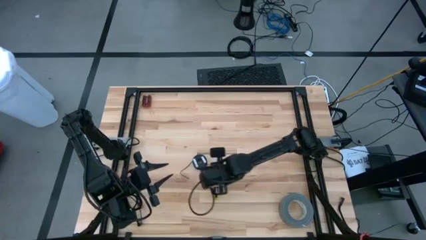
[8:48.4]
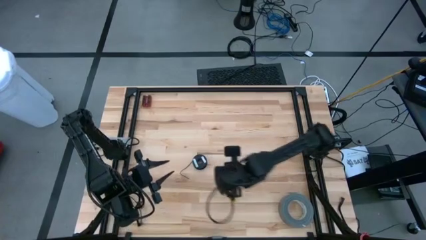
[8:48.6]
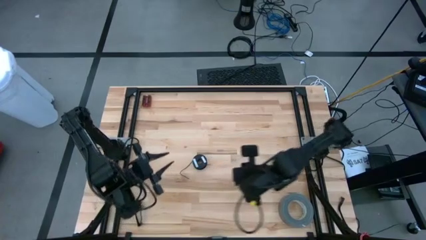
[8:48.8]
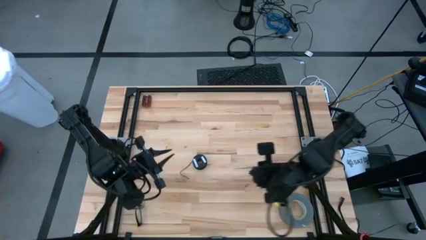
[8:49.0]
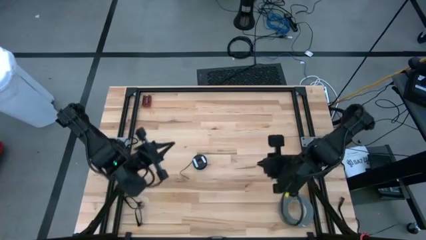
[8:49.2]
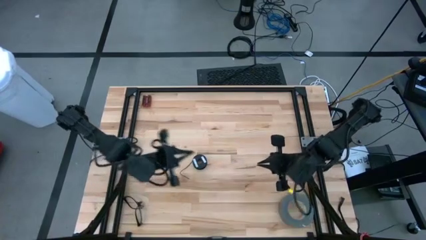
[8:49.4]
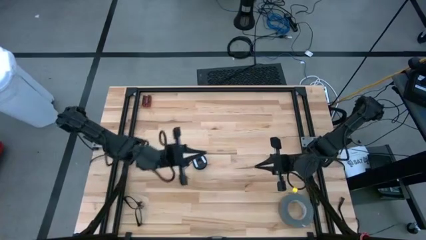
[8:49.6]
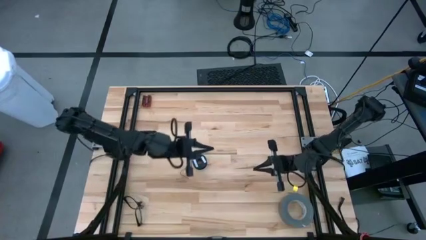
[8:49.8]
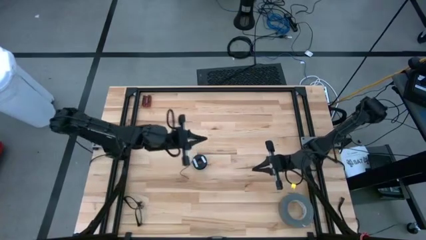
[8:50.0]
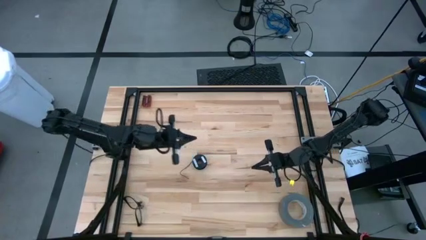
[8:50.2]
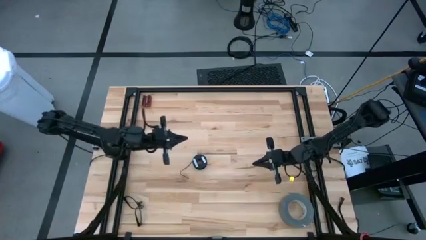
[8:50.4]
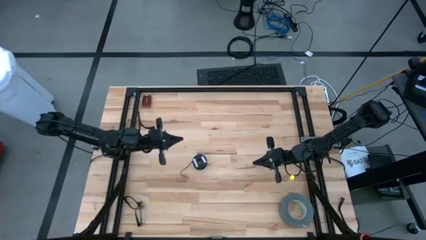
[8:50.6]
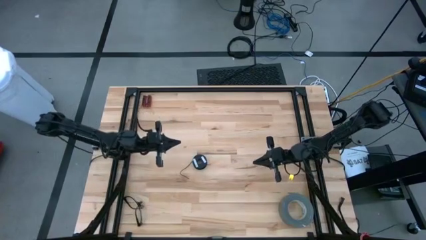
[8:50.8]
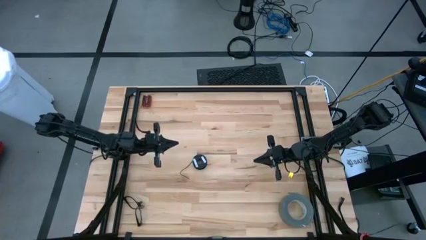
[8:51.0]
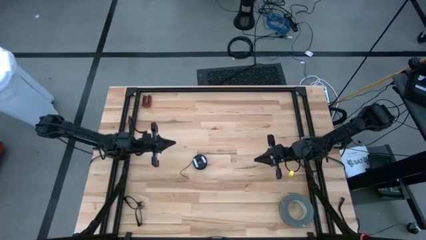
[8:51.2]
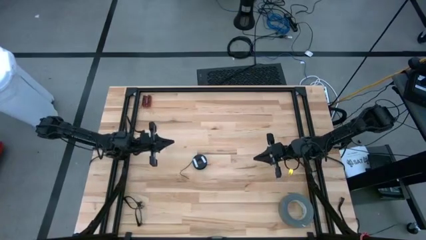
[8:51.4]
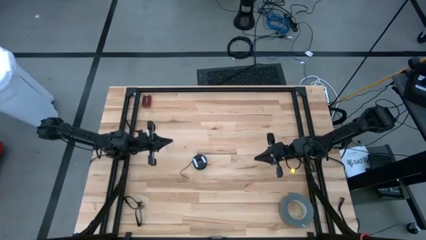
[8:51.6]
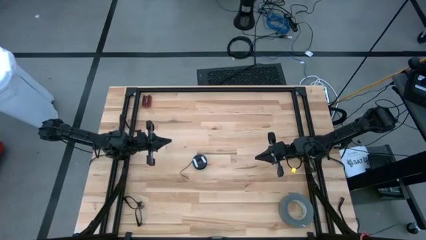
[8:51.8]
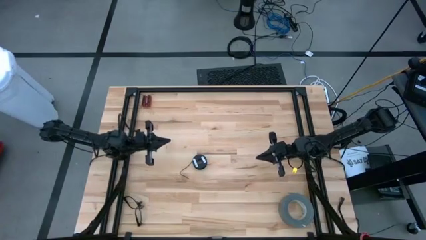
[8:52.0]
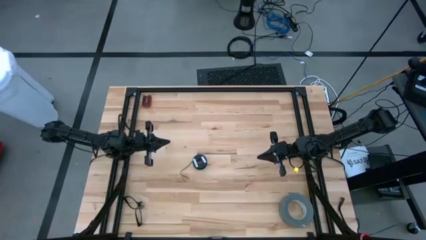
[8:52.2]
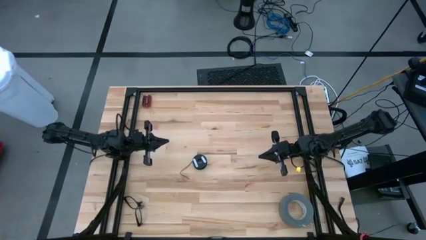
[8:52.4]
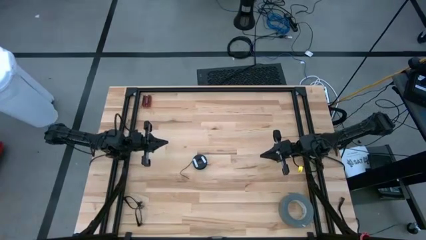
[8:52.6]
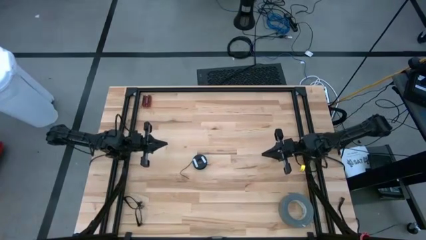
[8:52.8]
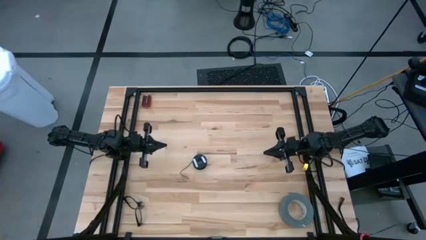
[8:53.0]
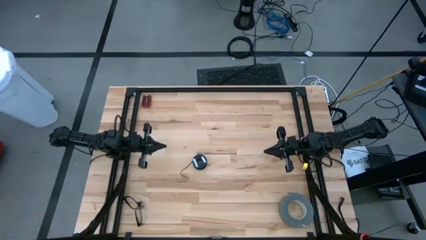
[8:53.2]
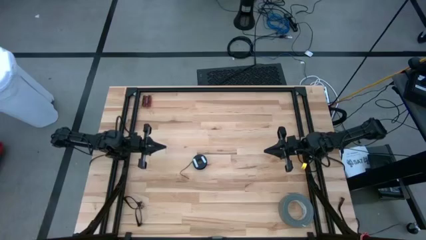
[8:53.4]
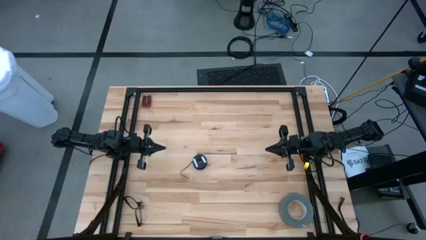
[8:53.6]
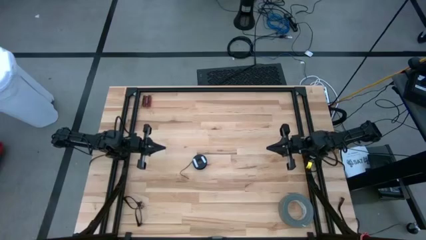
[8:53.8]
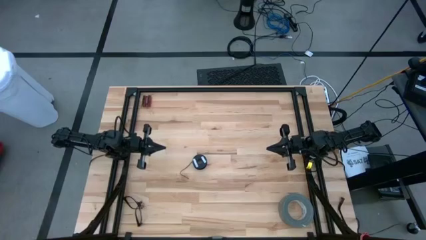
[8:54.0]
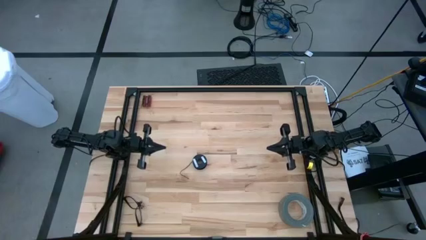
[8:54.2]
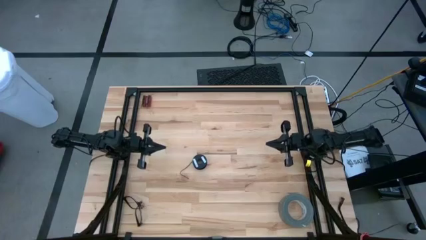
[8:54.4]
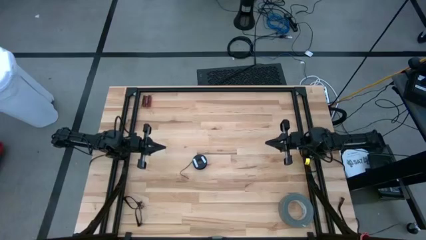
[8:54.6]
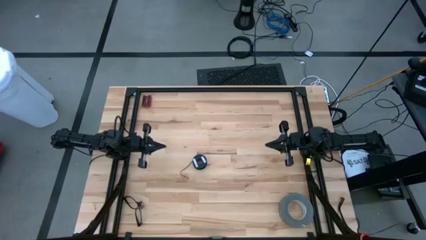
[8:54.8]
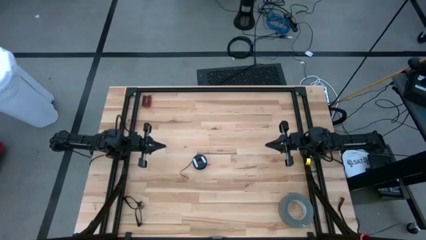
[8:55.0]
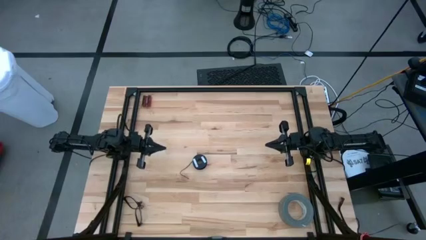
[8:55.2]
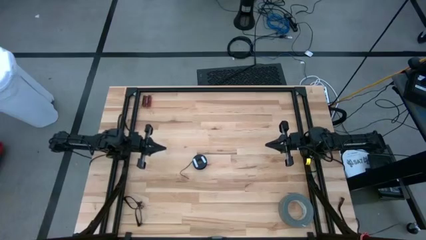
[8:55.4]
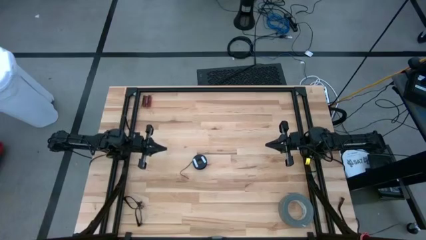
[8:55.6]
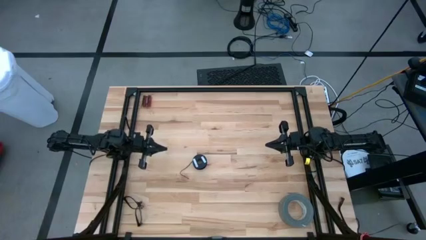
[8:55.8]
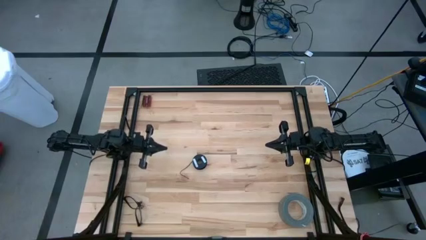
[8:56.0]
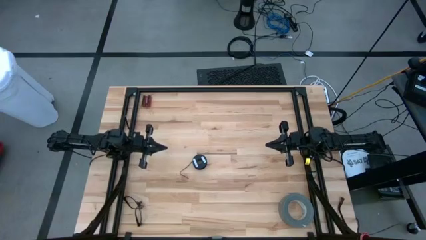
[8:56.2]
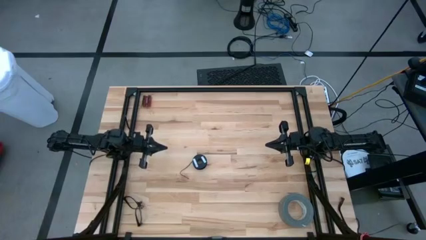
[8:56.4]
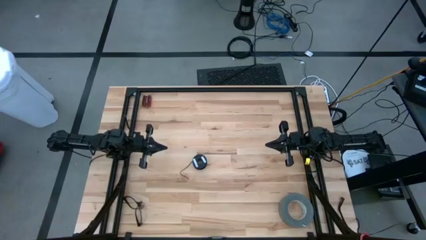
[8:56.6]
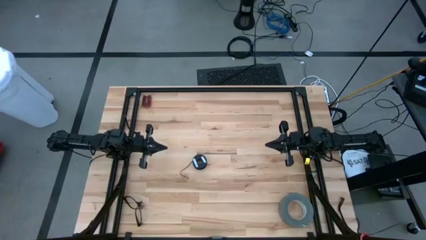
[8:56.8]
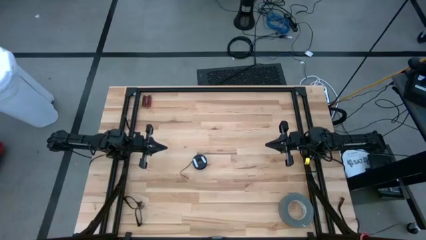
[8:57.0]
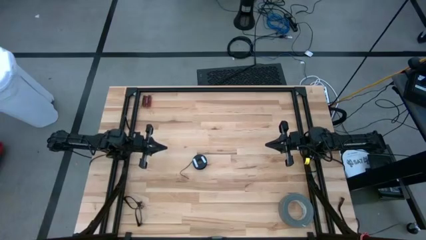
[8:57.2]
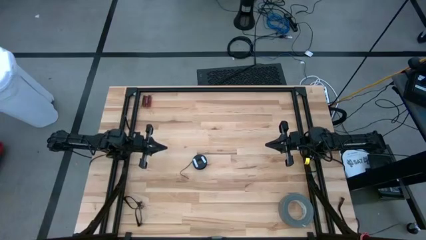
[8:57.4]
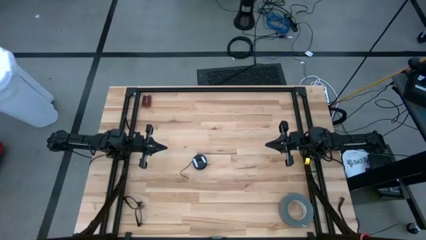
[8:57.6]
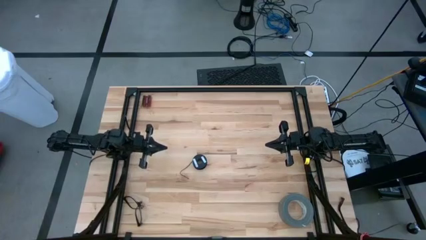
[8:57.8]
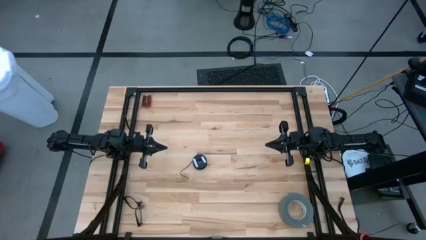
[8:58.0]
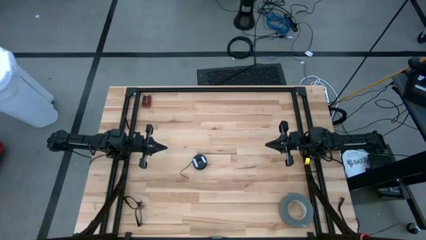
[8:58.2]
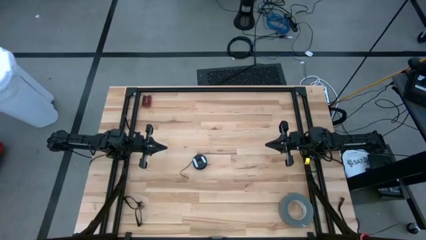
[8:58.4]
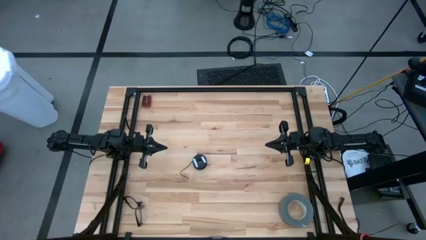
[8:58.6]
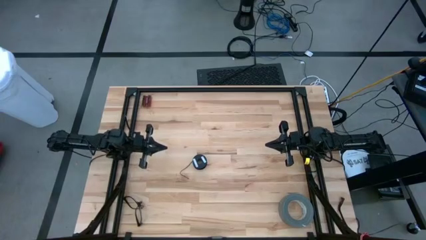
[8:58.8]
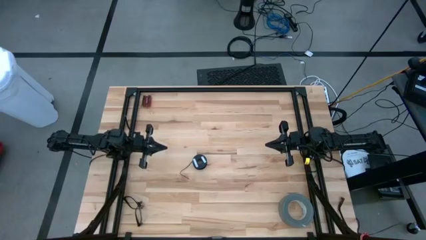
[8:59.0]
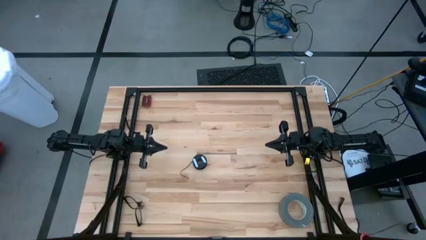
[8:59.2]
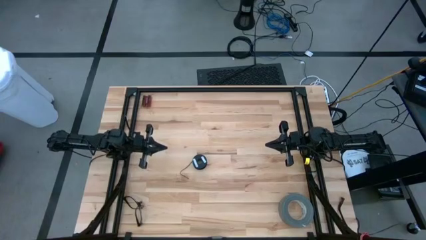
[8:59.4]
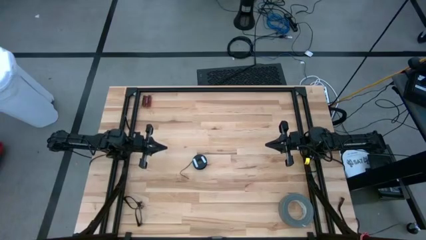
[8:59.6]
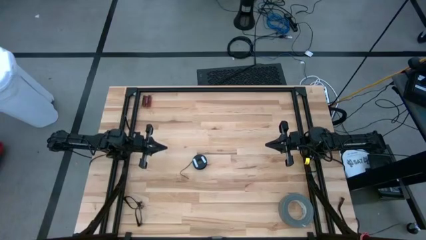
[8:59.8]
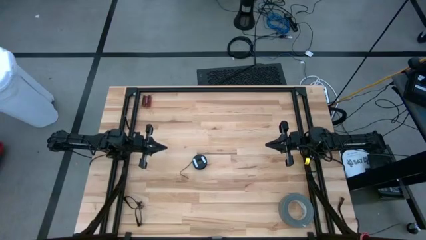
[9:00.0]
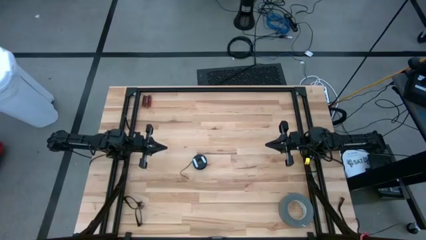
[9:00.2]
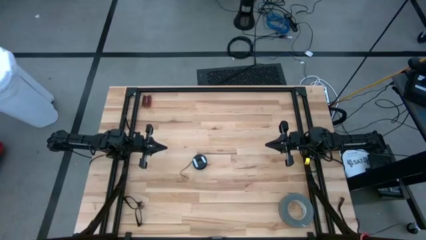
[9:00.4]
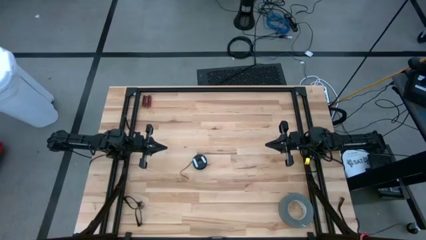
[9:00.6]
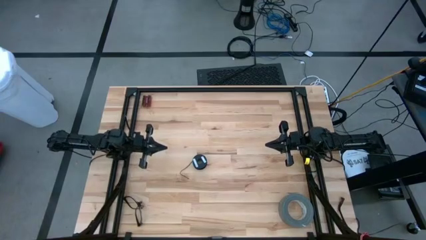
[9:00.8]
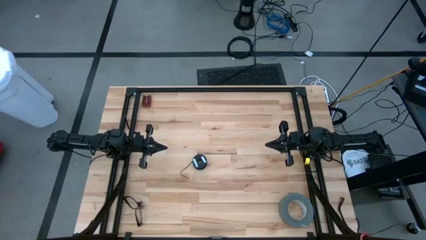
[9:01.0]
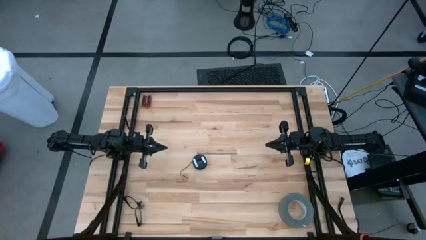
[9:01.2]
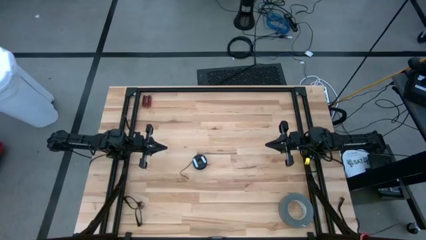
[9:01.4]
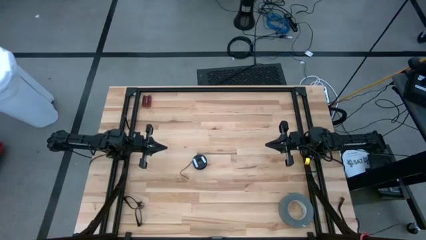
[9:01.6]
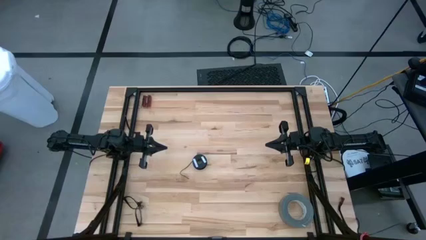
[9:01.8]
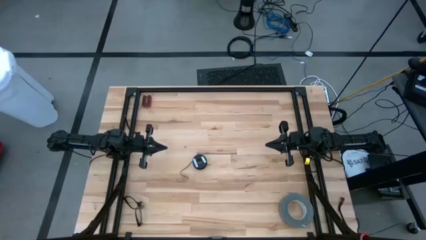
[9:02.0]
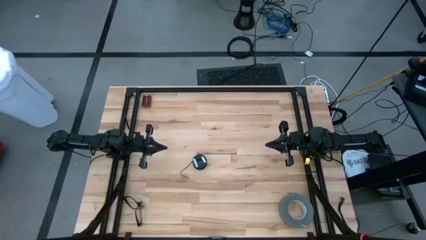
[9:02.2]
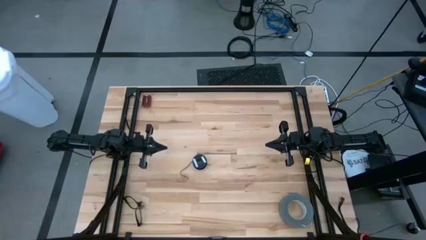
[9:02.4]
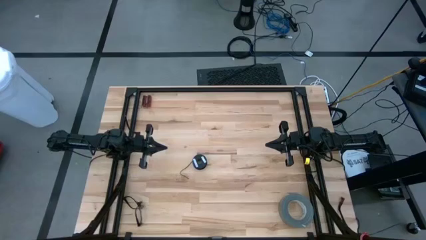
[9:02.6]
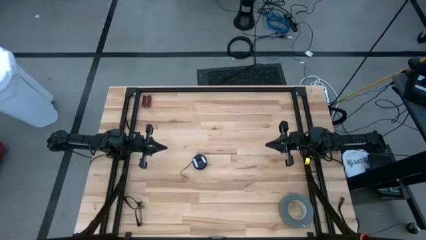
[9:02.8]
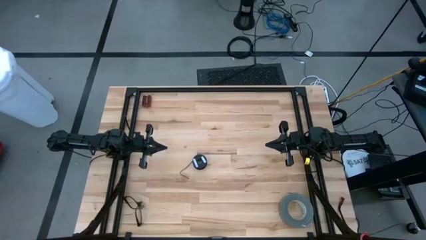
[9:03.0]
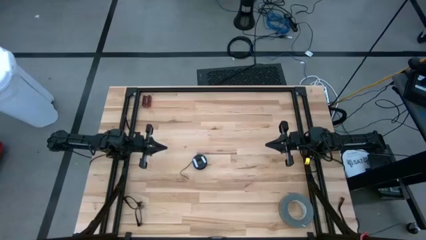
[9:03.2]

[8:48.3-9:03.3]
Task: Coil cords
Return to Home Position

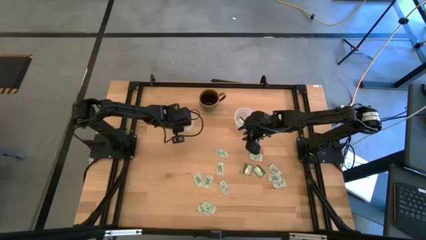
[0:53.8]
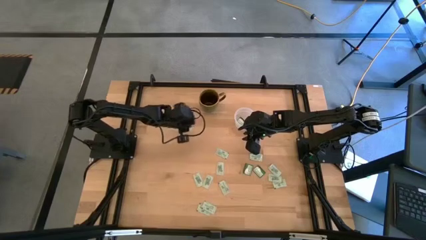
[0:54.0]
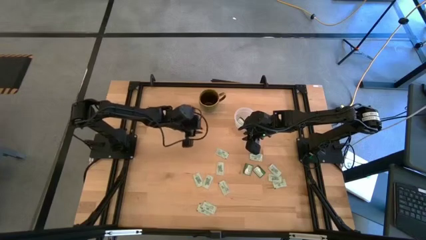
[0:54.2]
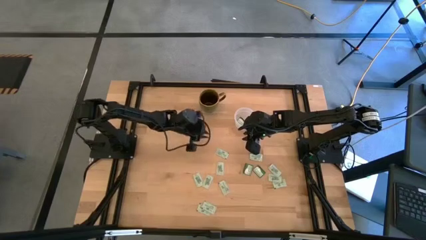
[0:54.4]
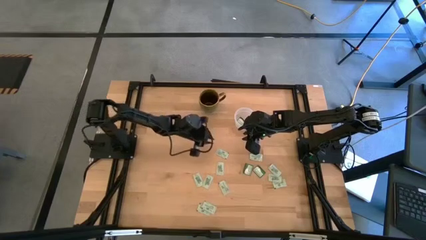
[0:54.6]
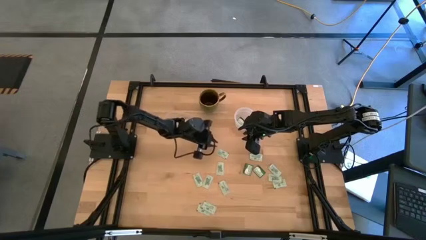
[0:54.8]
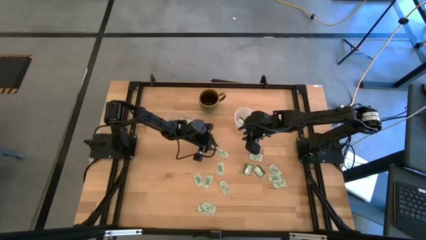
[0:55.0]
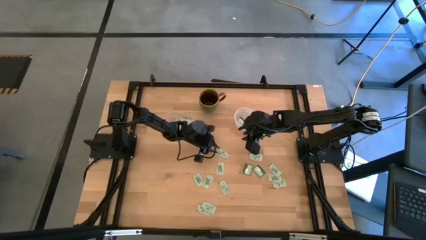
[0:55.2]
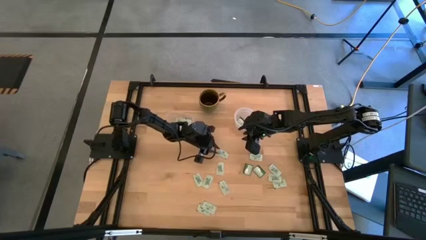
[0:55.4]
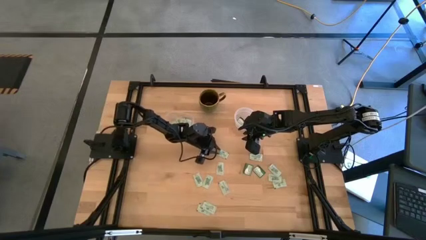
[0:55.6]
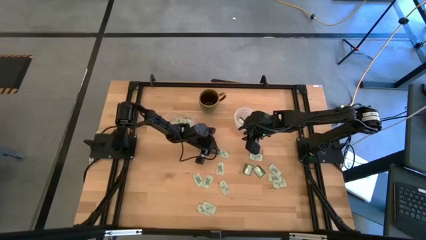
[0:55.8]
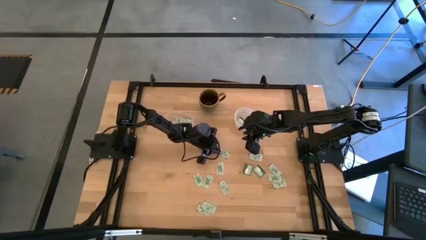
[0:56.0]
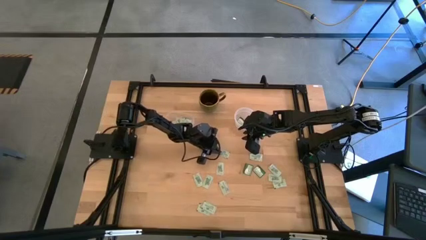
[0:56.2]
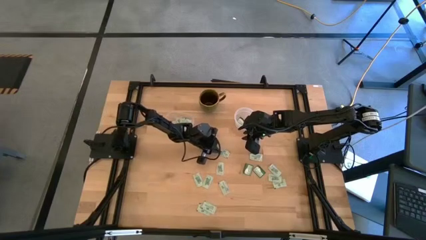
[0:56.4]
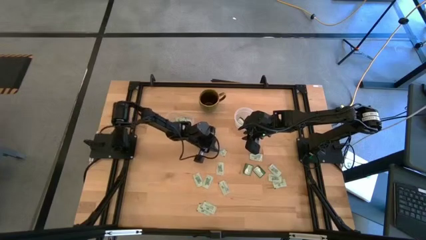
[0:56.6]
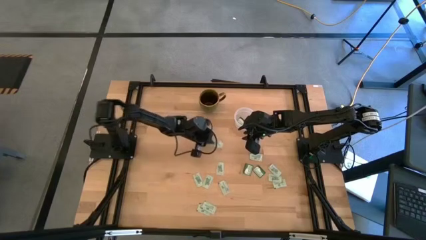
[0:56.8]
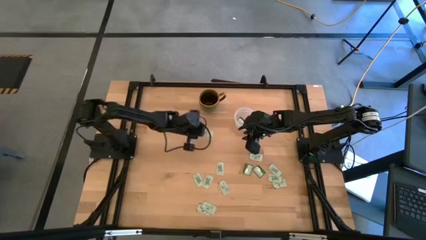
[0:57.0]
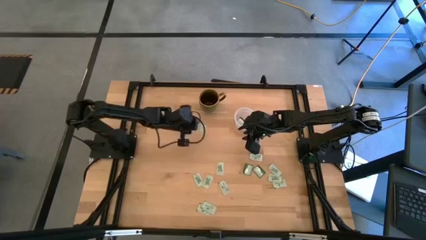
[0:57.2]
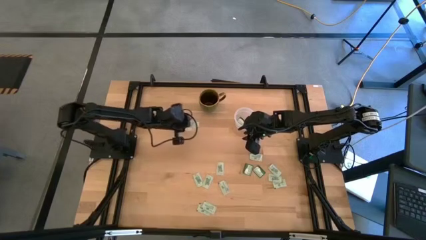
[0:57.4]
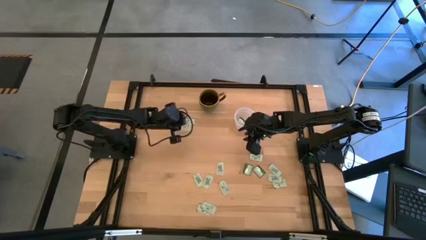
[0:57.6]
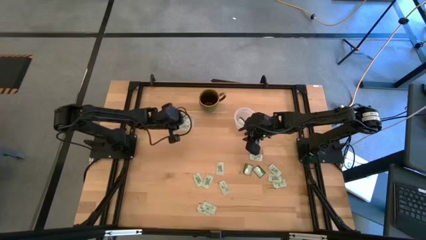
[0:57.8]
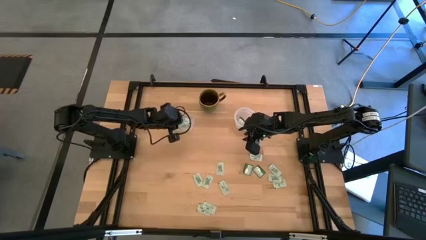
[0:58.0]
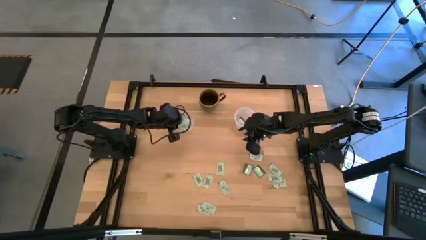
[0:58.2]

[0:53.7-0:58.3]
Task: Pick and place Stevia / Truvia into bins
Put the light green stevia packet into the left transparent container
